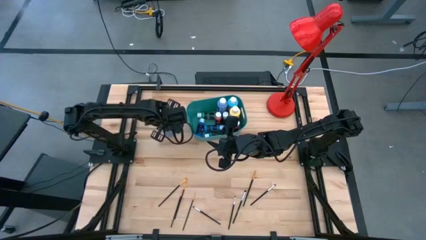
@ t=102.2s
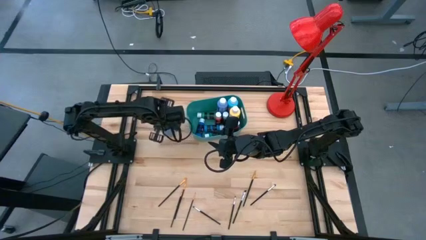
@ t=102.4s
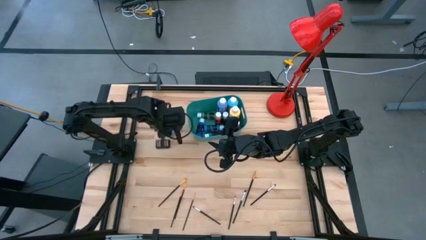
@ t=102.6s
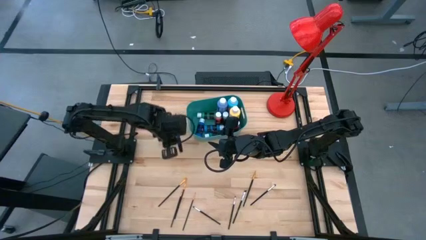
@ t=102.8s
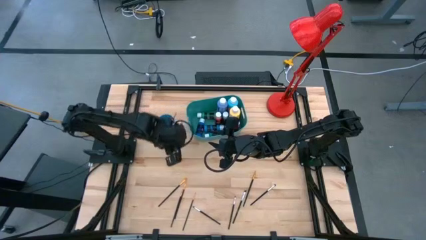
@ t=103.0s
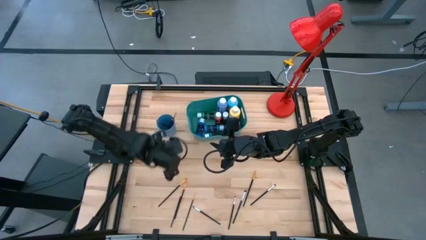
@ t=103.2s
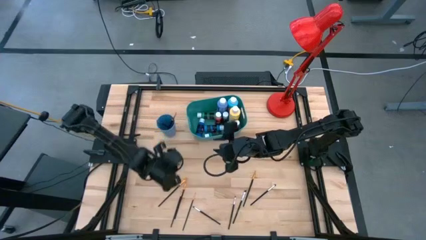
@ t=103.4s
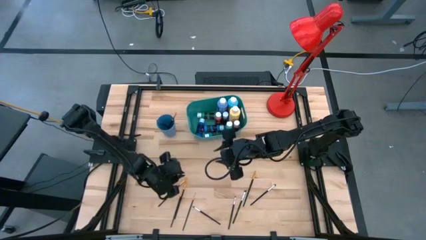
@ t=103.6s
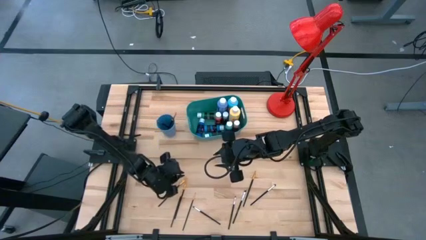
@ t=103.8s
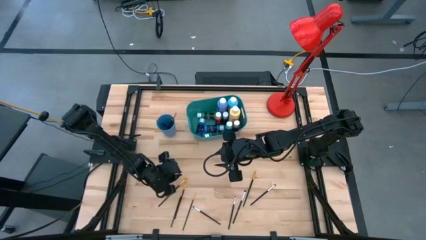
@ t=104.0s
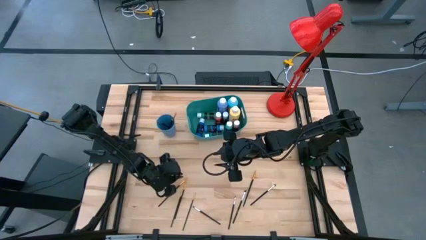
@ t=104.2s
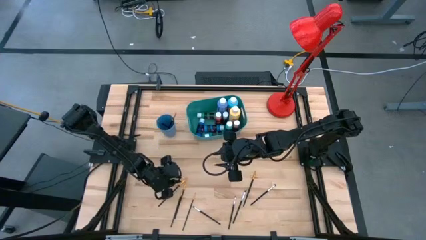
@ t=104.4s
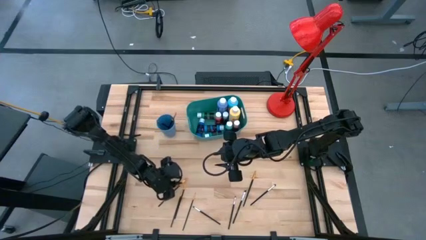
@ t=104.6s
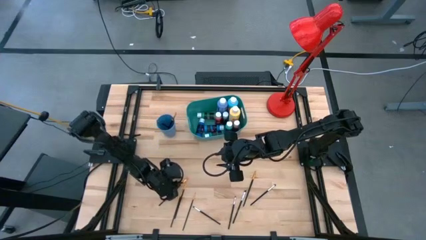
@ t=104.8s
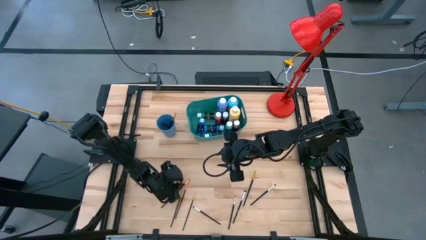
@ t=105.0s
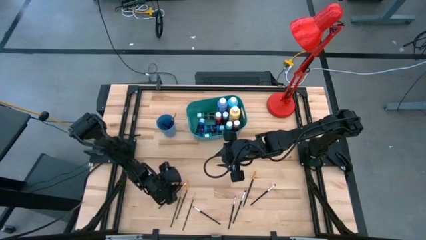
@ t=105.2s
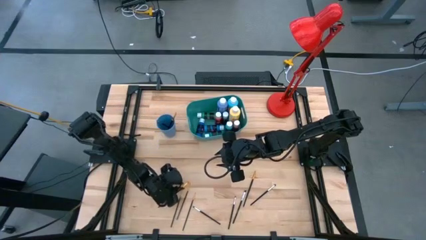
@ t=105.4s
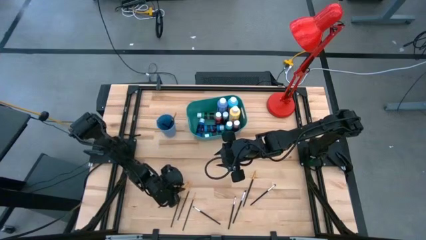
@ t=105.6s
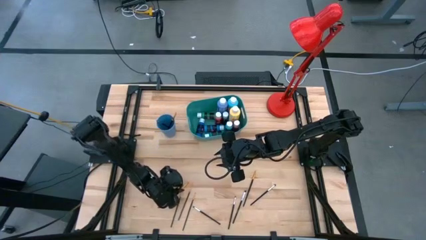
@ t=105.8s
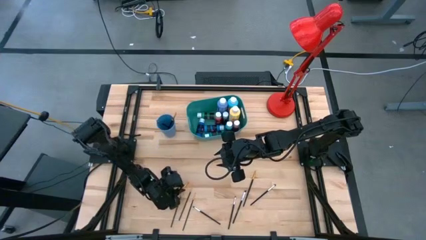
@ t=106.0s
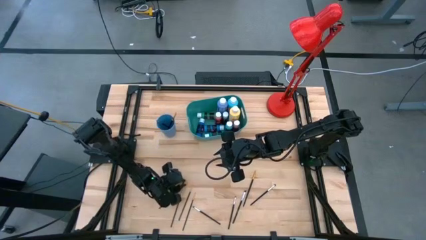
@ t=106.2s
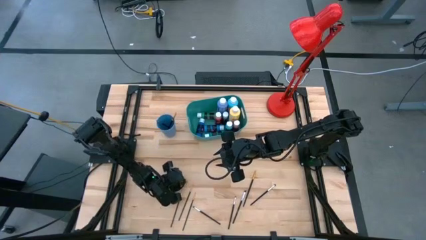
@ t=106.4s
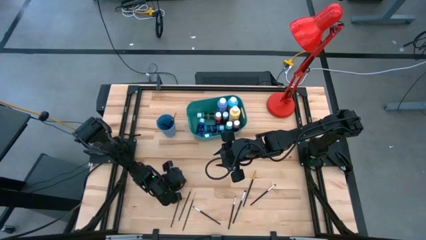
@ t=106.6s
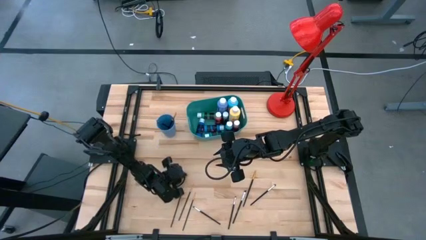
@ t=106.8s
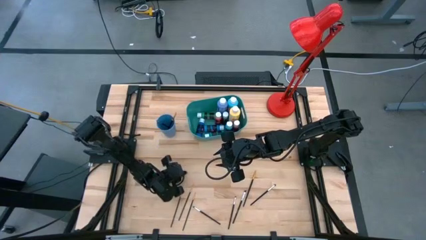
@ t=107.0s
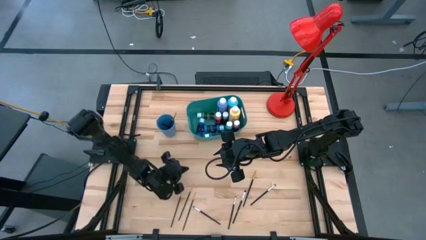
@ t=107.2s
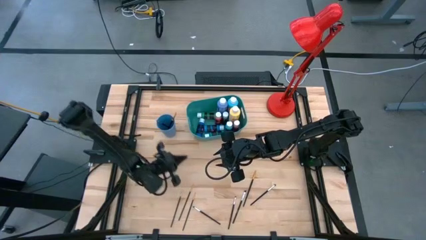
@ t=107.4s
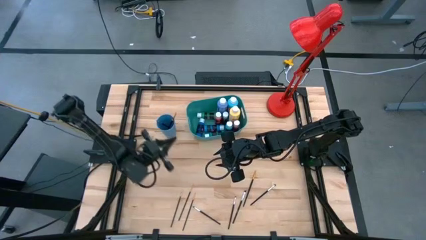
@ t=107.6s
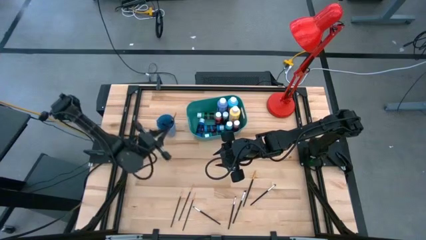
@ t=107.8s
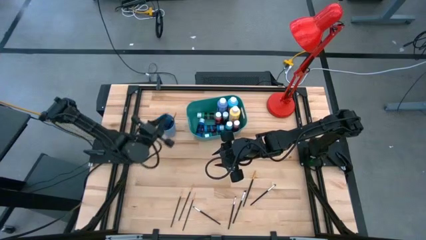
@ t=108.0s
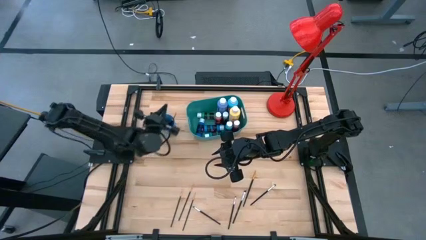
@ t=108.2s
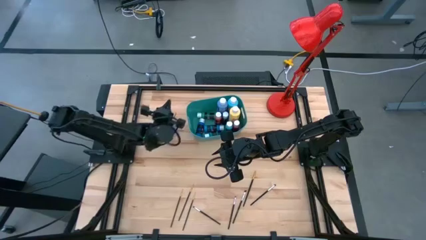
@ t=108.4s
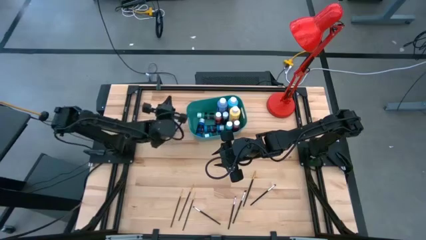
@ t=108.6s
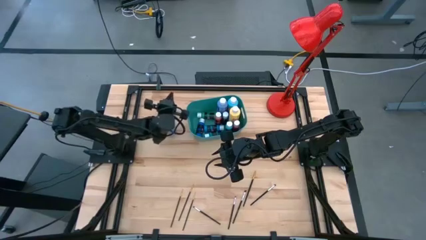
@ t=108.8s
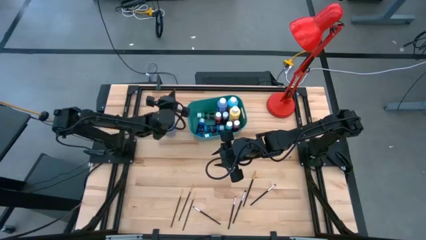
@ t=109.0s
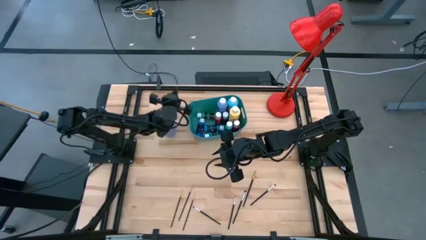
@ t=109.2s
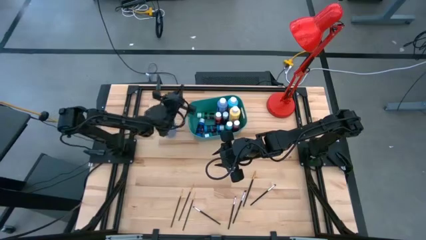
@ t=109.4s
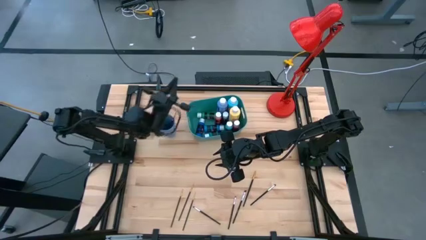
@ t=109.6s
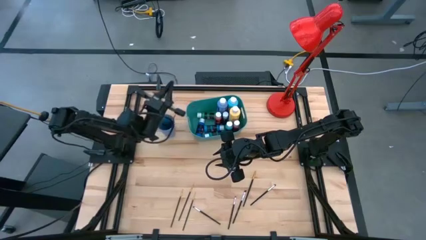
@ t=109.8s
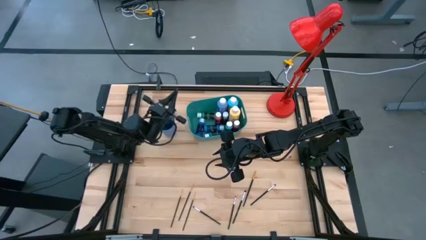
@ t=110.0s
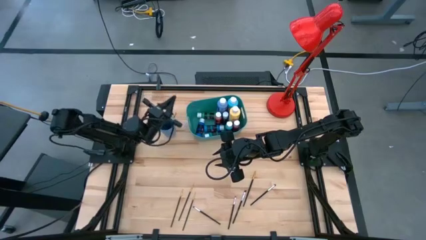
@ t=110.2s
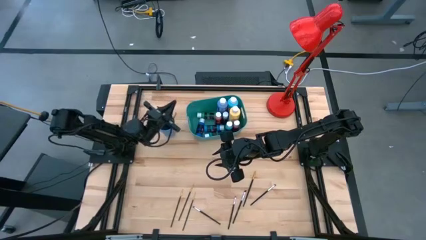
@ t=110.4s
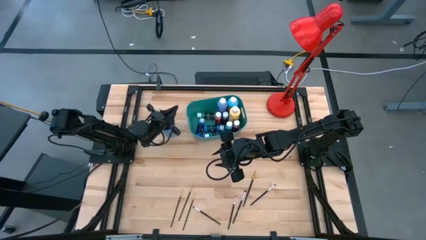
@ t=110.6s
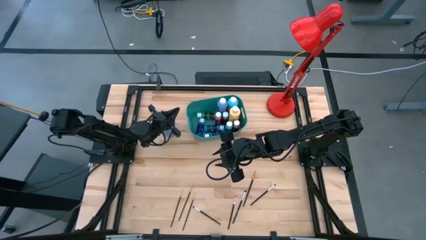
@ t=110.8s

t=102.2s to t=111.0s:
Task: Pick & Place Paint Supplies
Put the gold paint brush into the blue cup

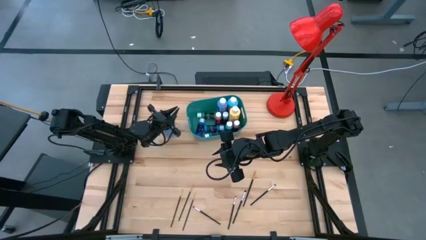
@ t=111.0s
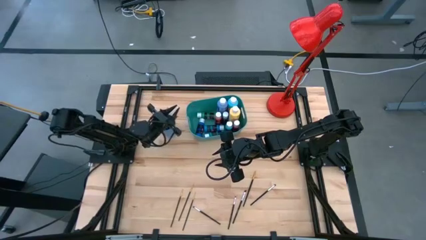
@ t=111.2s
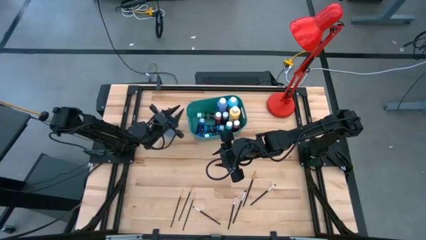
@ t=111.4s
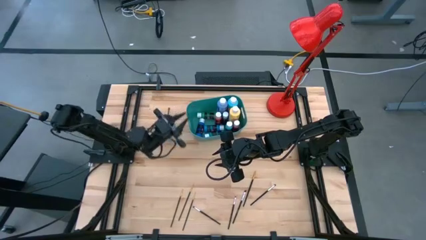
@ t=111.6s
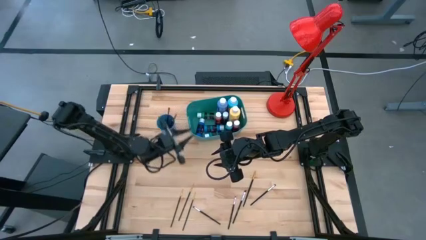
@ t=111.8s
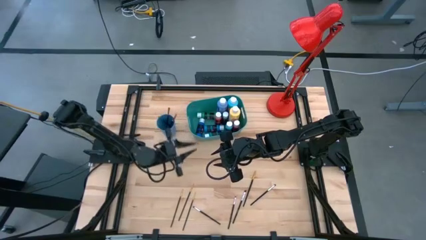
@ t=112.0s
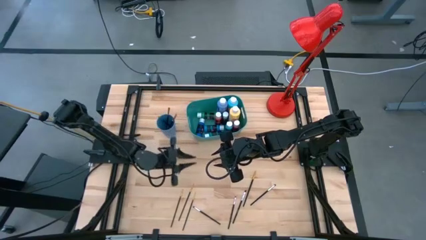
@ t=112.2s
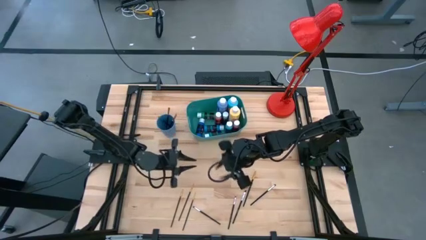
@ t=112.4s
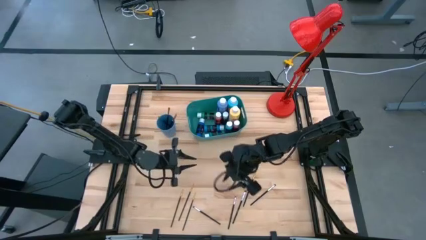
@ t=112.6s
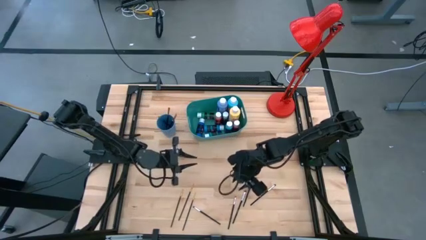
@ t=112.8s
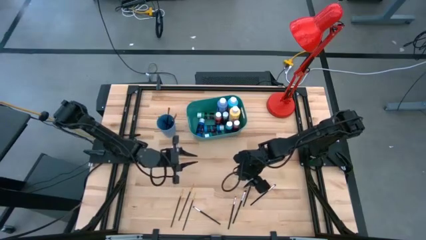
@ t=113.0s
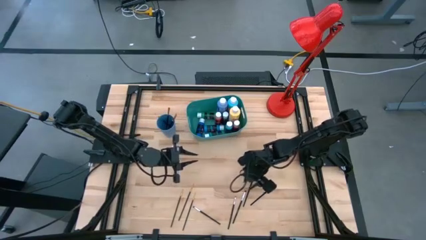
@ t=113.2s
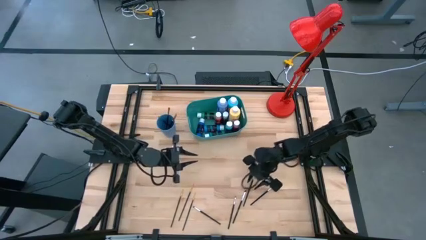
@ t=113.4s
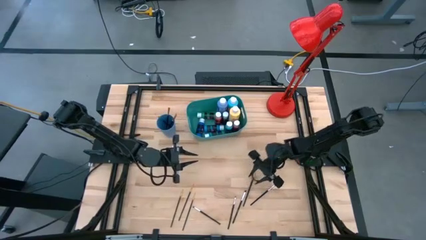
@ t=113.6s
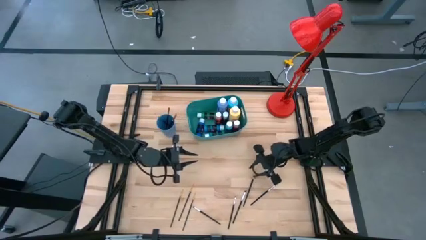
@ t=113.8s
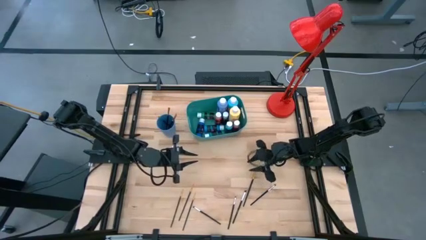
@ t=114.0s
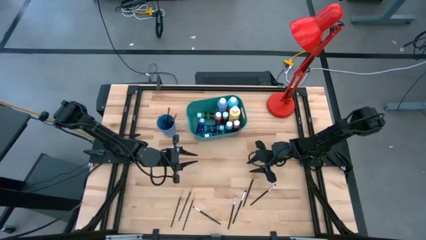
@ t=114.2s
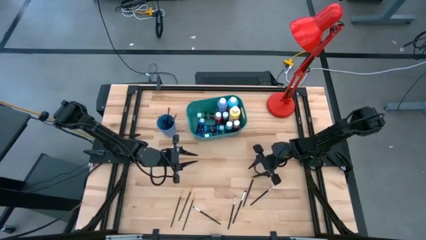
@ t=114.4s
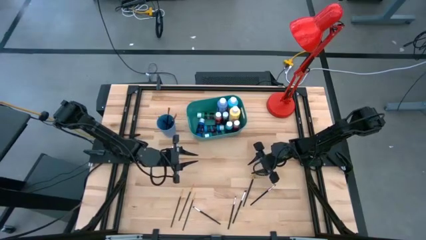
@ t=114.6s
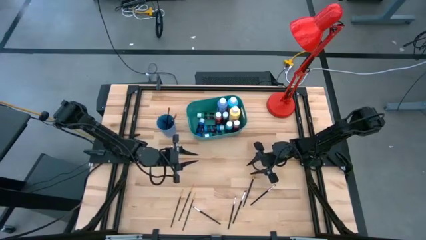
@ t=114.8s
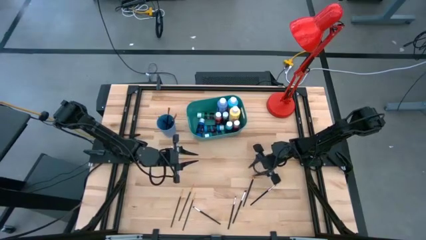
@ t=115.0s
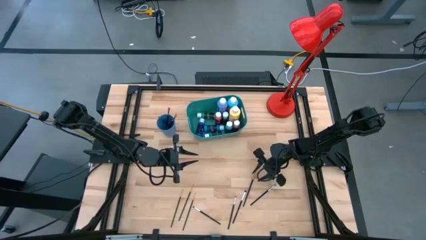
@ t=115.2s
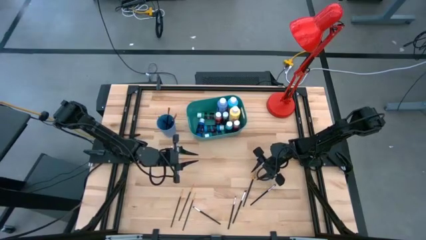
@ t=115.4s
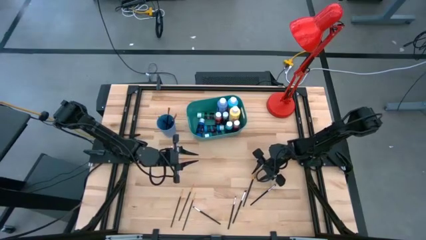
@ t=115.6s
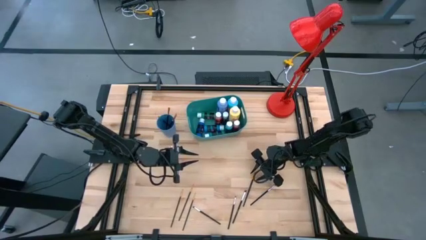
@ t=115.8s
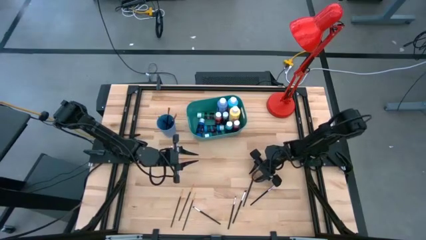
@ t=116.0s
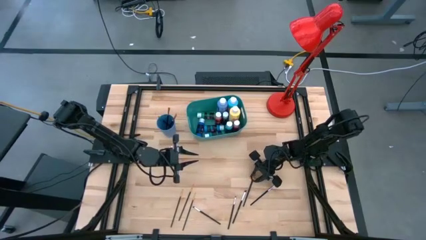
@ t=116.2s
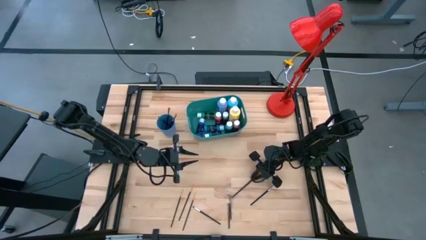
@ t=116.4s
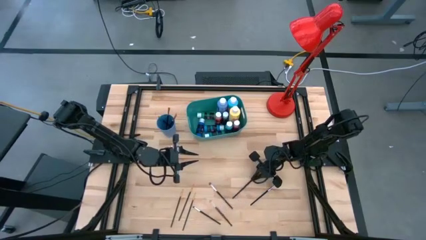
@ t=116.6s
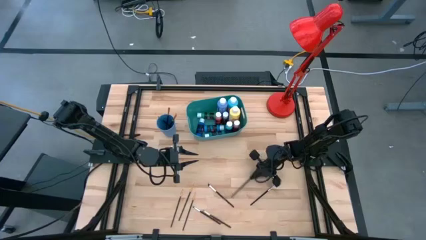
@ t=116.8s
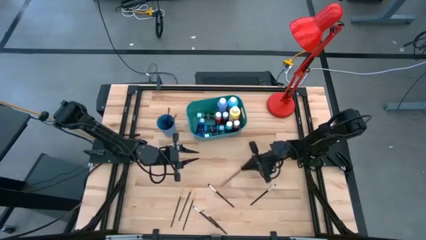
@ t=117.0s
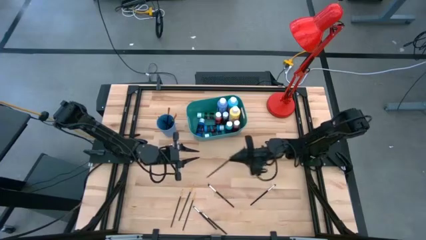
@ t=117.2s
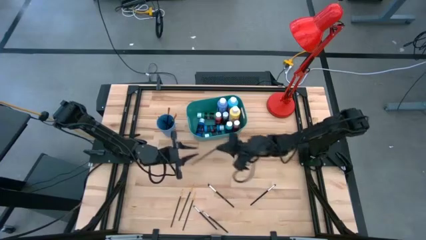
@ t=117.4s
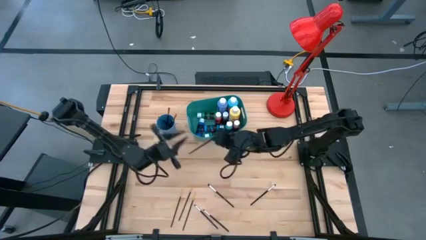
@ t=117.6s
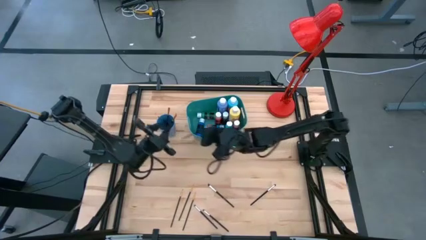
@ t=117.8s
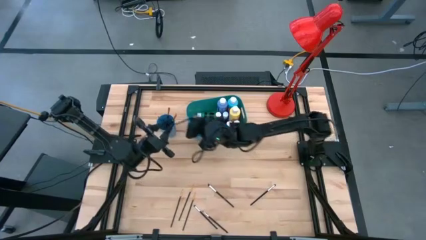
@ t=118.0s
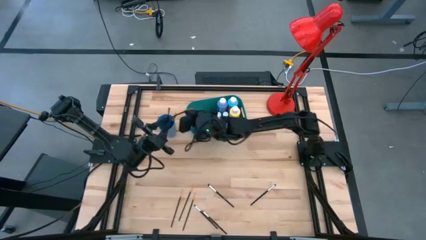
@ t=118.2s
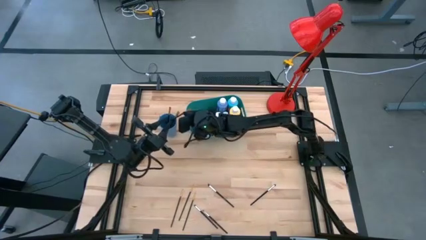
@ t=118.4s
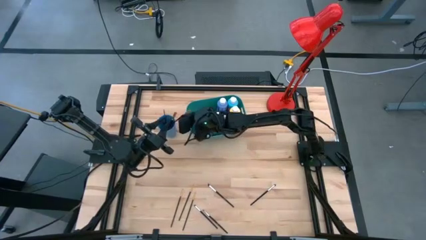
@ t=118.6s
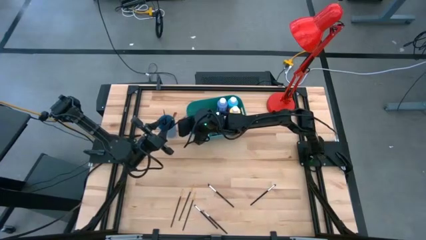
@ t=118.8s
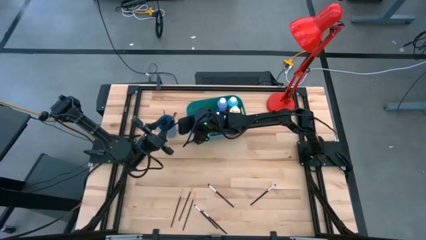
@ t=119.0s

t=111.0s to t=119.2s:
Put the gold paint brush into the blue cup
